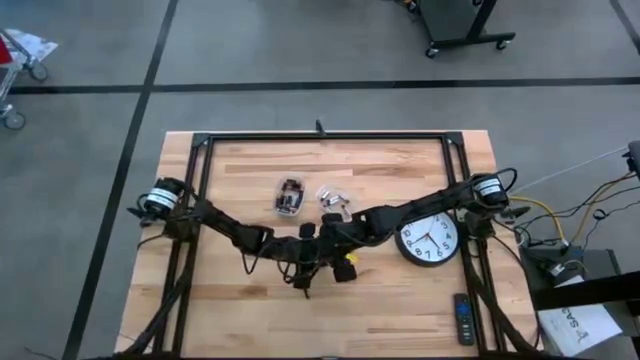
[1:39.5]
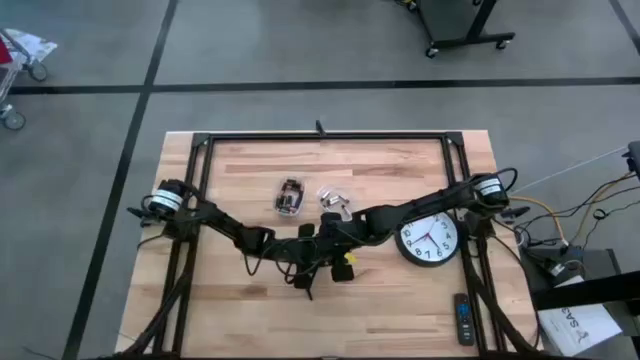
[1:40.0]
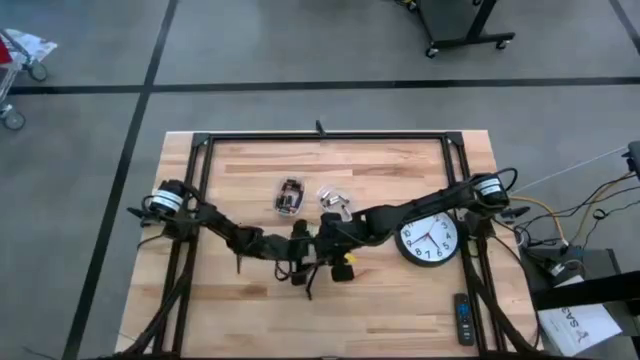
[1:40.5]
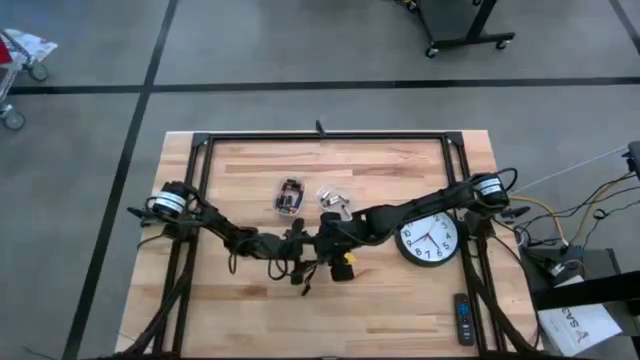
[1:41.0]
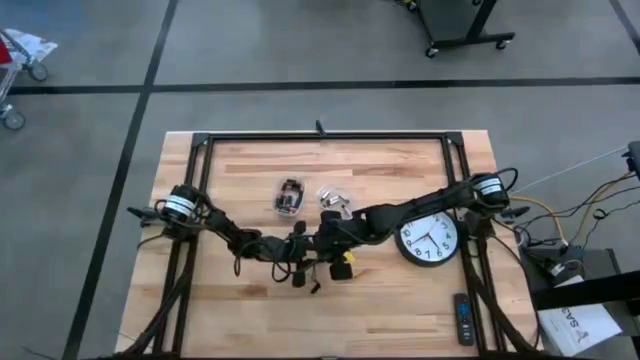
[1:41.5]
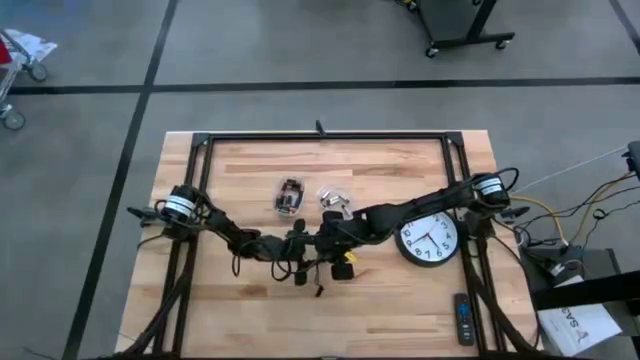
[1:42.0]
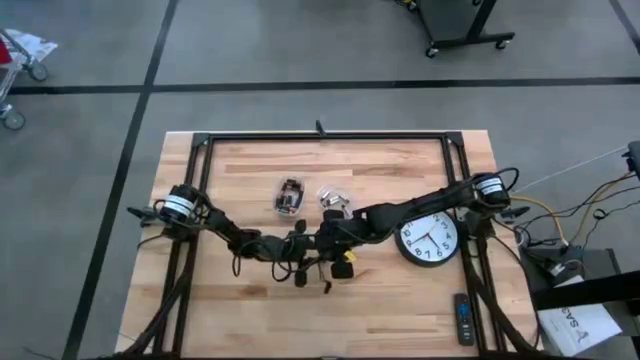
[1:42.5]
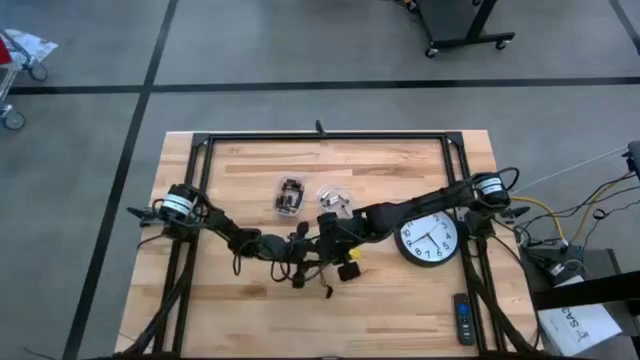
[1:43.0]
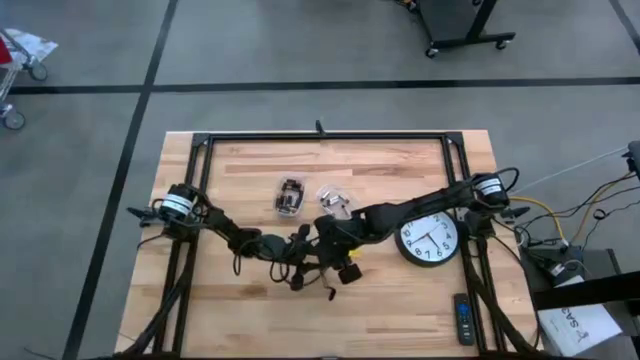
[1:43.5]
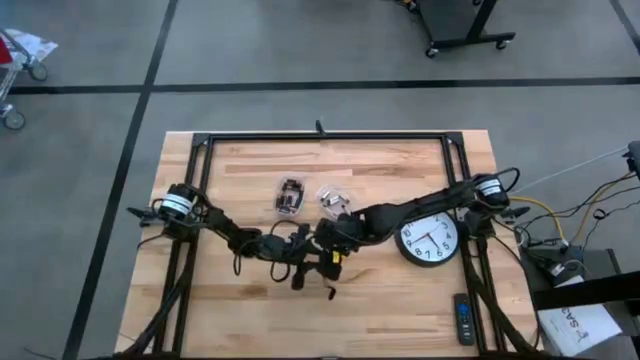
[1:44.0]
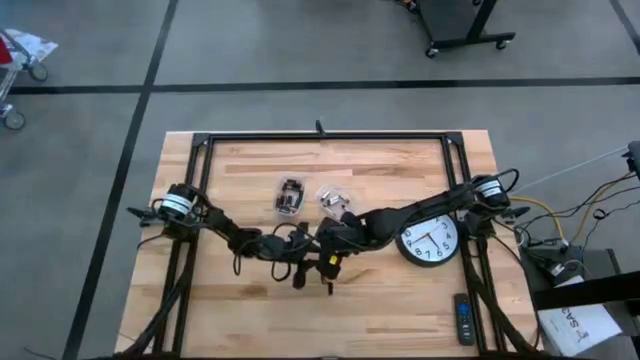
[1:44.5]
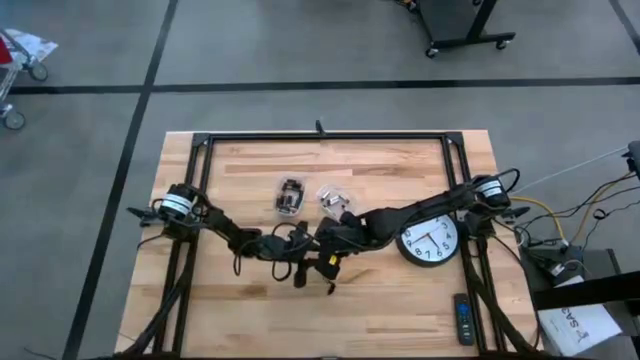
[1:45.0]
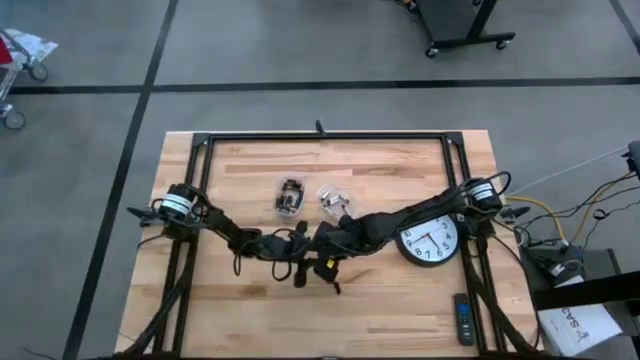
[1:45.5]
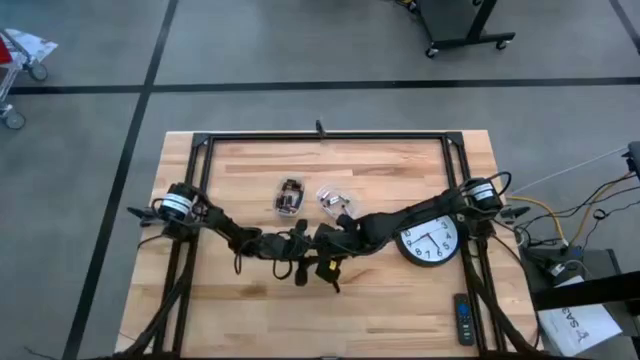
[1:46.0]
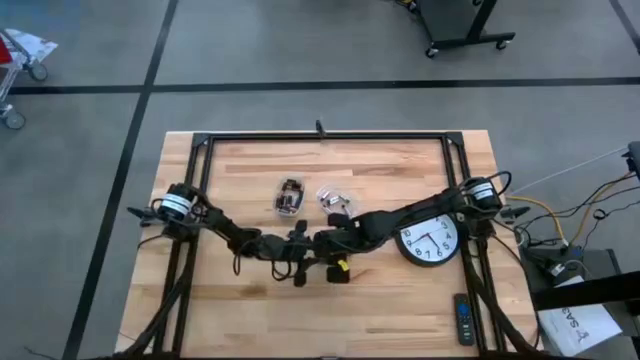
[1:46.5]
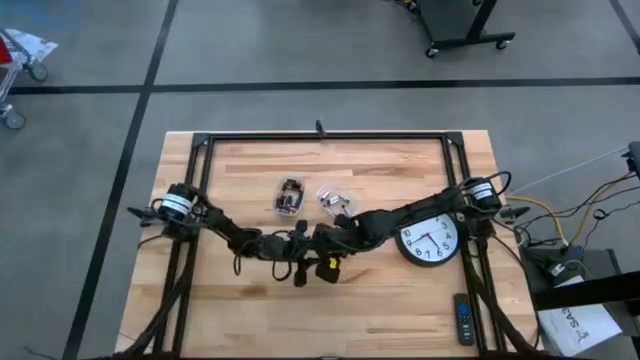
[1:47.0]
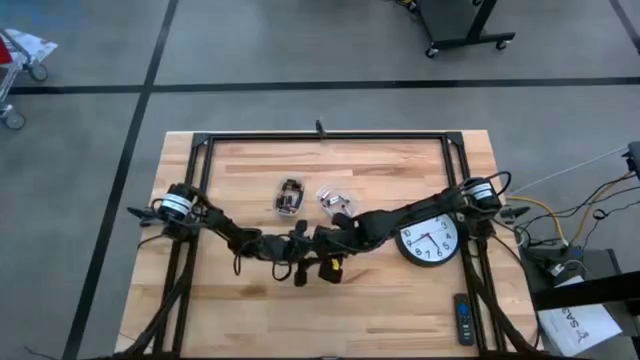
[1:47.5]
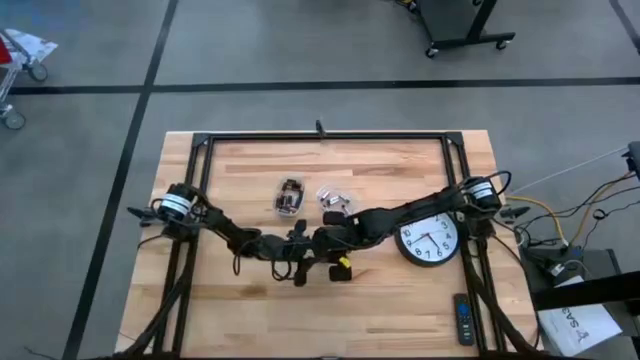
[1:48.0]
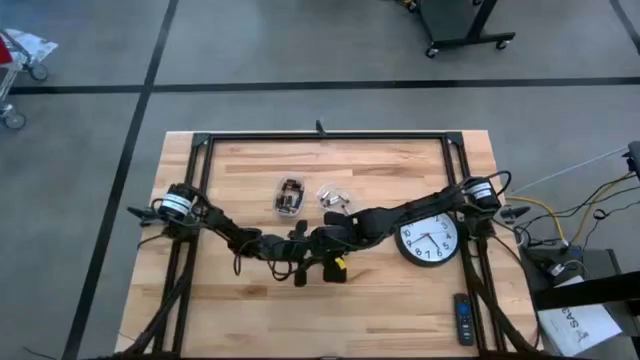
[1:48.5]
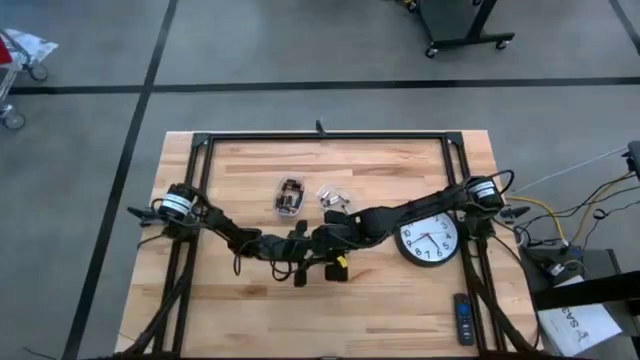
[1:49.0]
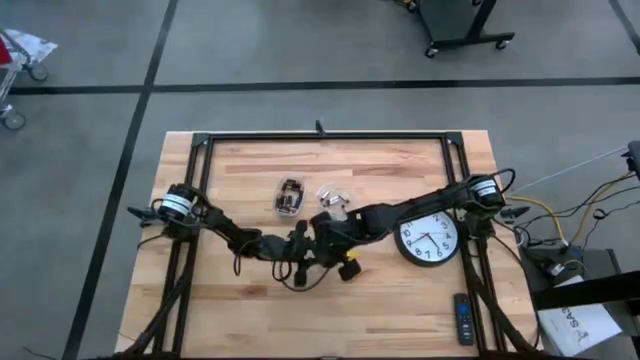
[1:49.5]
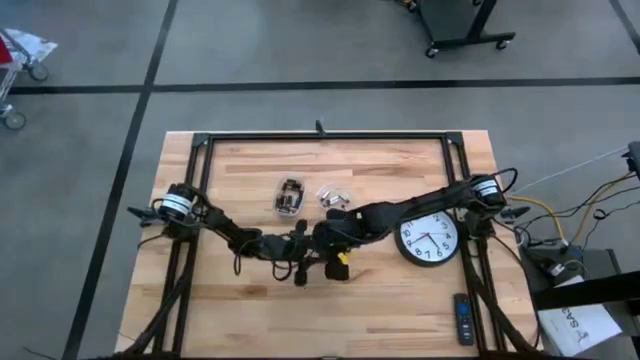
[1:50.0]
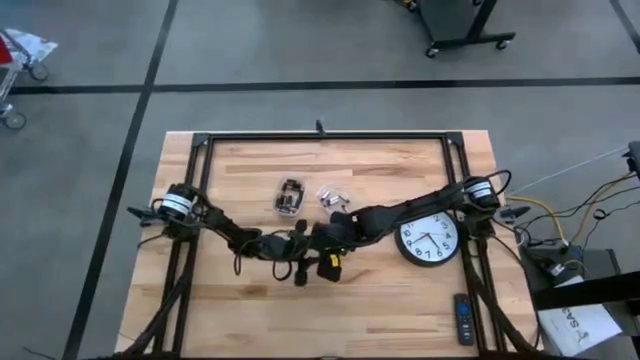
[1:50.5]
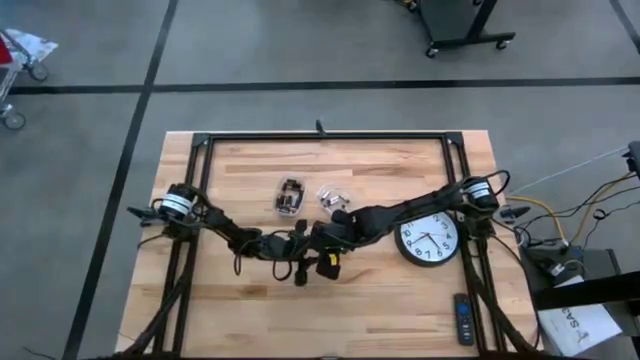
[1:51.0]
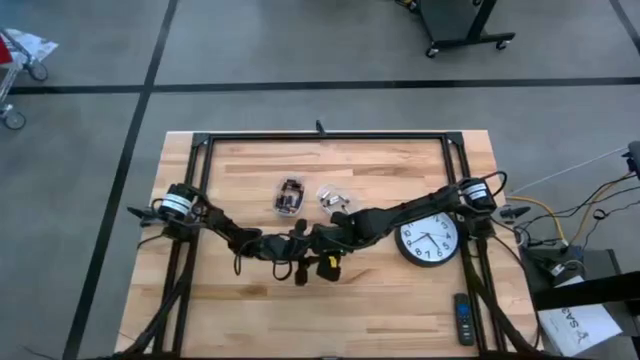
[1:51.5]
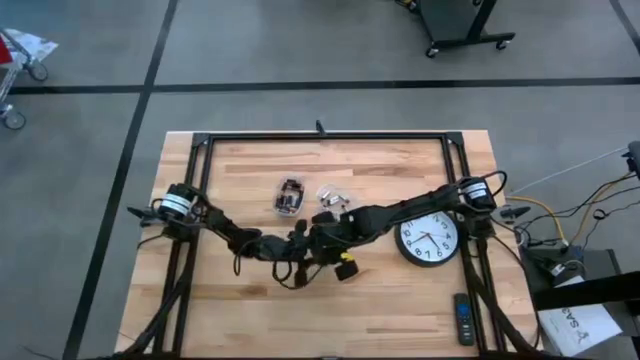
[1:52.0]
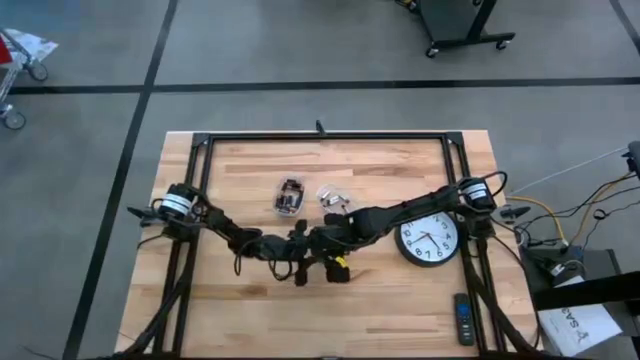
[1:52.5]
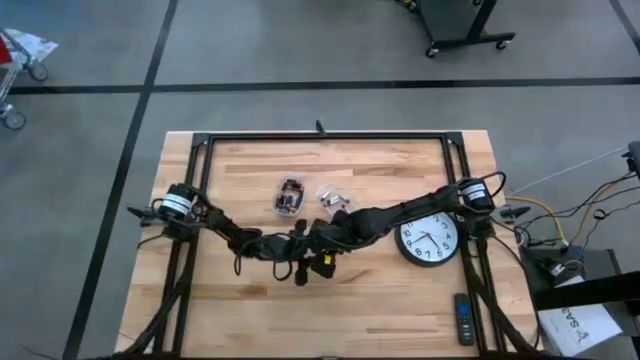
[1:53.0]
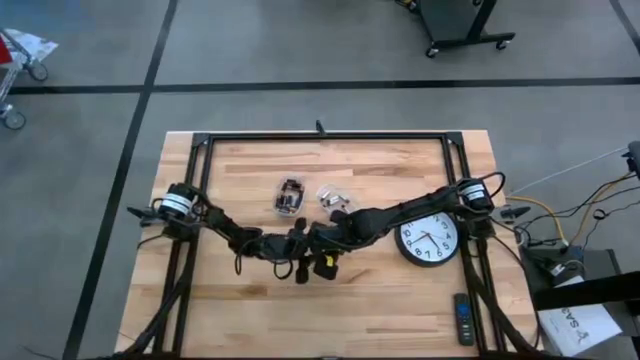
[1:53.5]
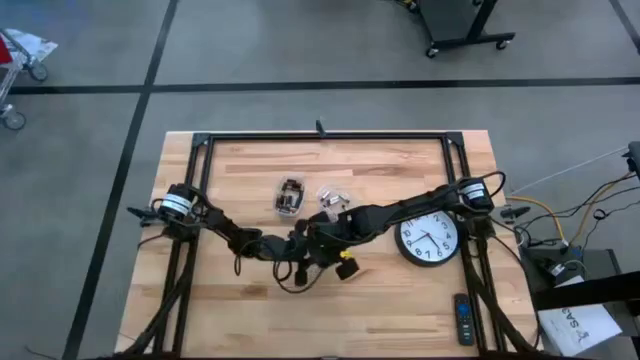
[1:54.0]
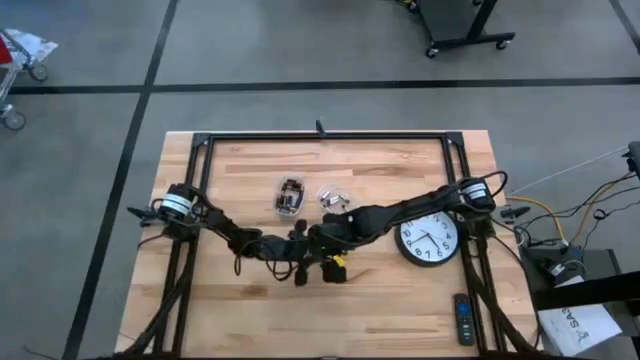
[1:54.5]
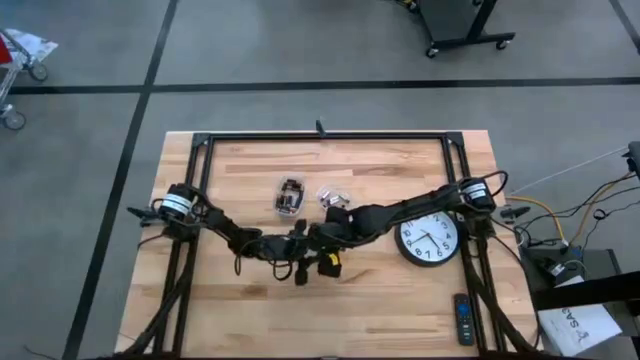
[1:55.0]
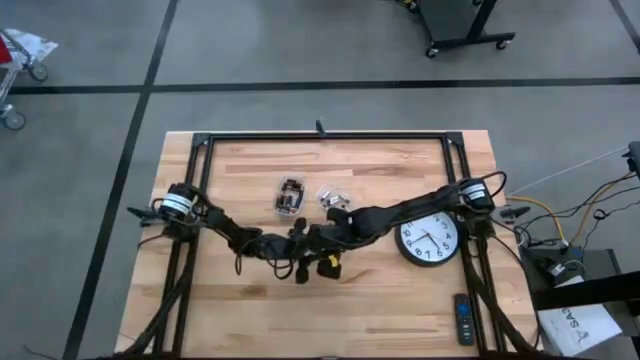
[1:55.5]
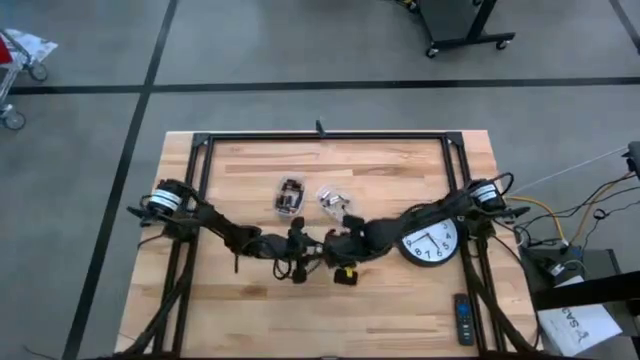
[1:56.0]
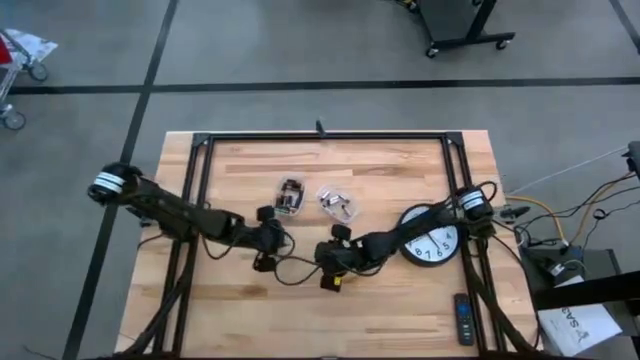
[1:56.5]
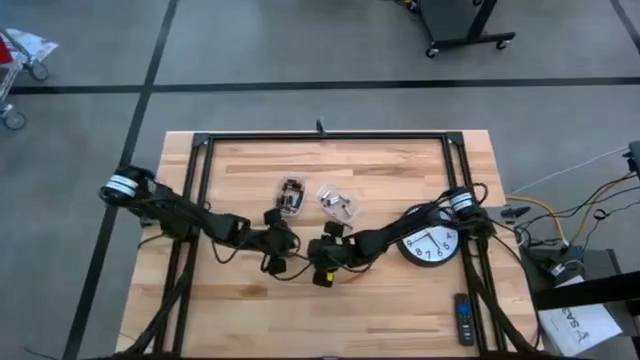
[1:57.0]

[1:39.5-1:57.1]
Task: Insert battery
Open the black flashlight cover

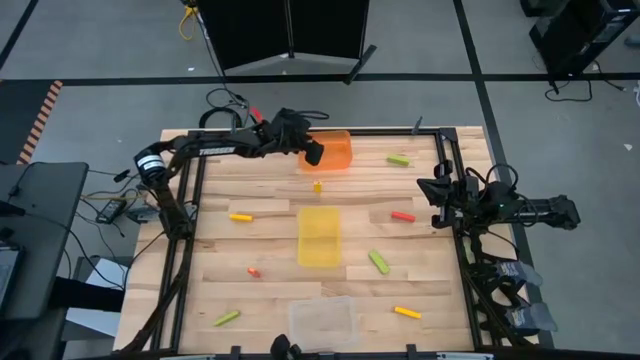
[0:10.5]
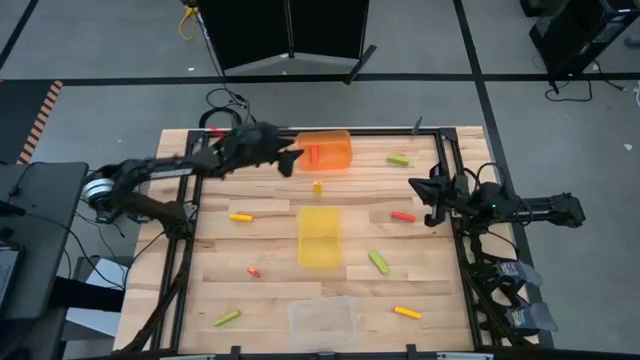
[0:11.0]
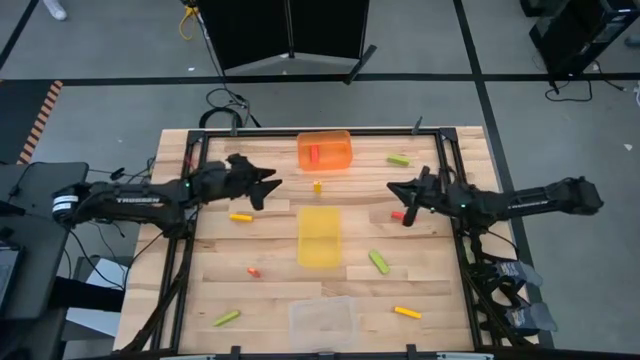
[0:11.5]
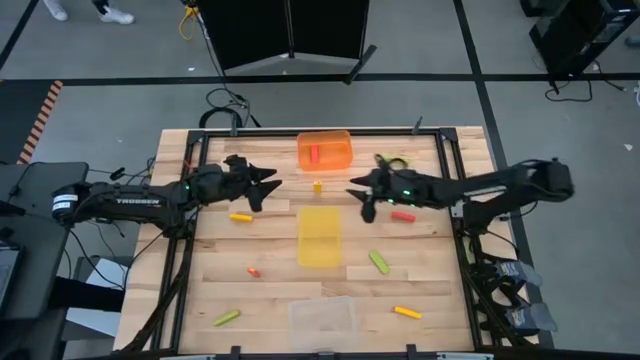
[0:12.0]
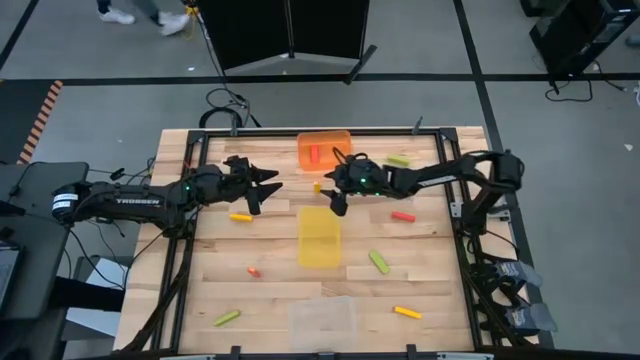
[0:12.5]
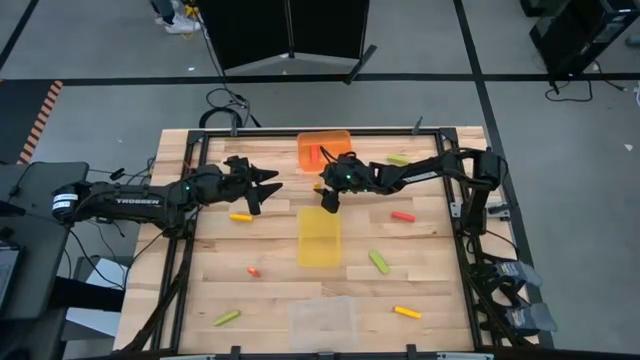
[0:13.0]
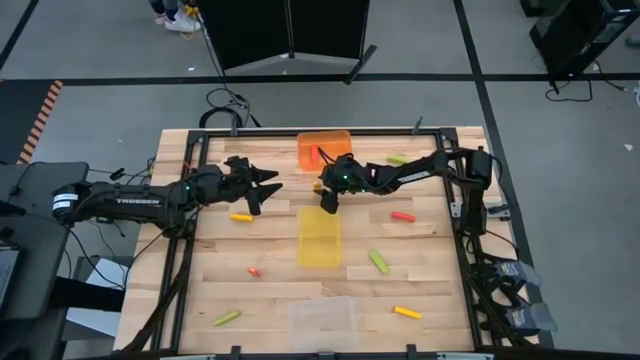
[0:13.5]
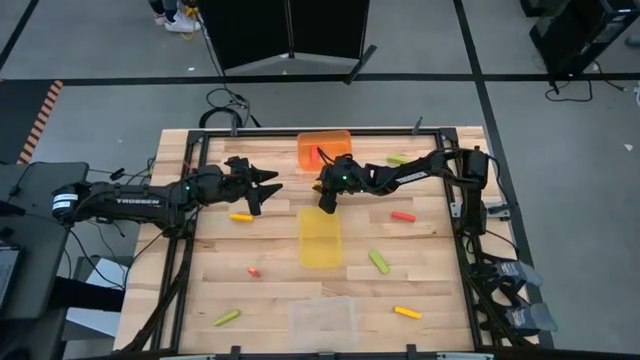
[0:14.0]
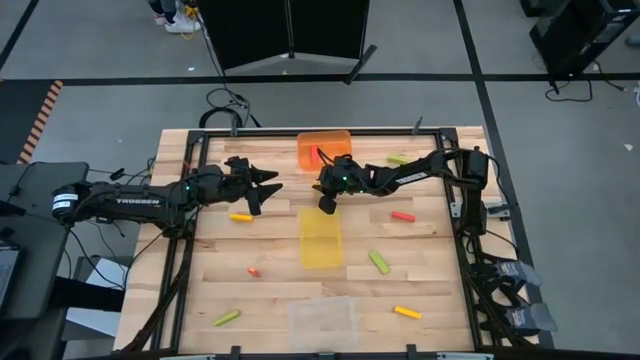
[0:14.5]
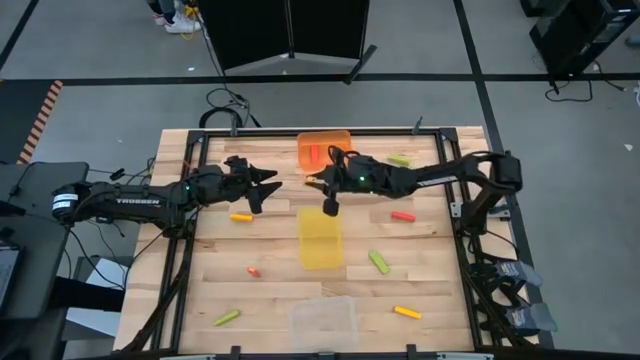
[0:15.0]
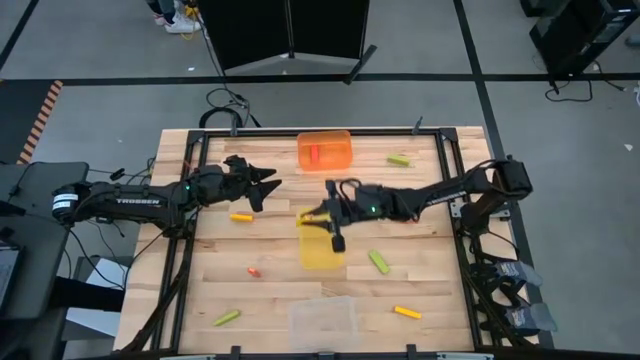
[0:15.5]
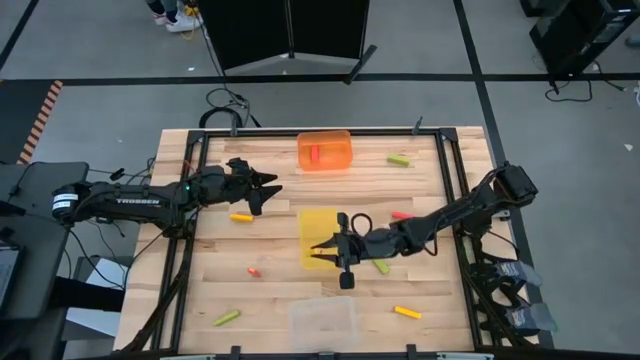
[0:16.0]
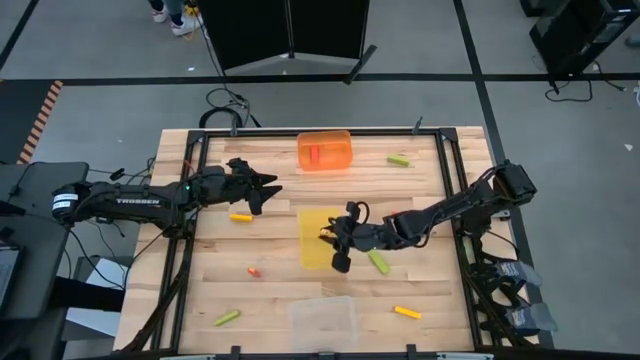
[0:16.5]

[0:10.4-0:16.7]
Task: Sort blocks
Put the top yellow block into the yellow bin
